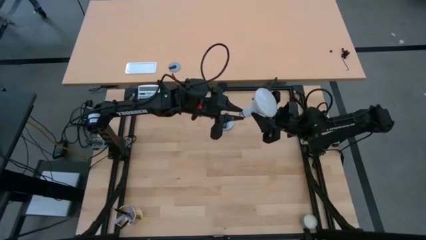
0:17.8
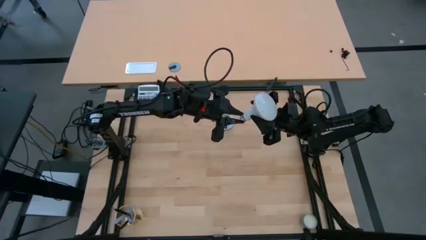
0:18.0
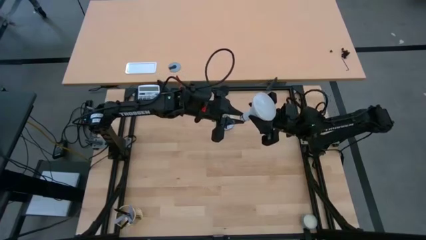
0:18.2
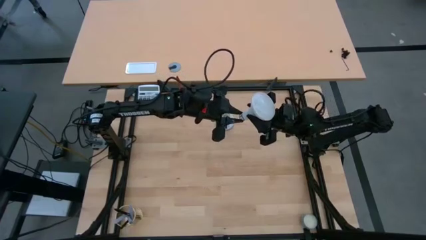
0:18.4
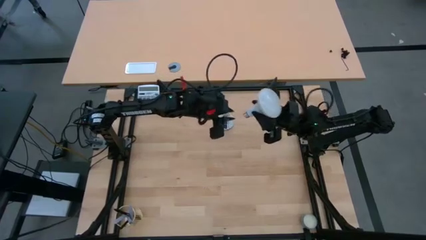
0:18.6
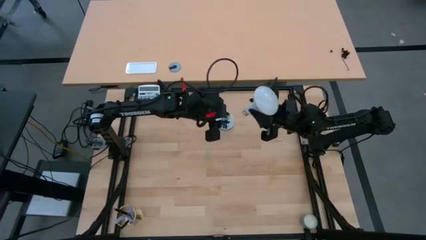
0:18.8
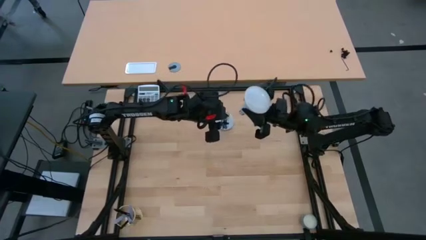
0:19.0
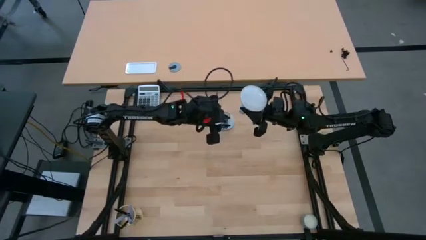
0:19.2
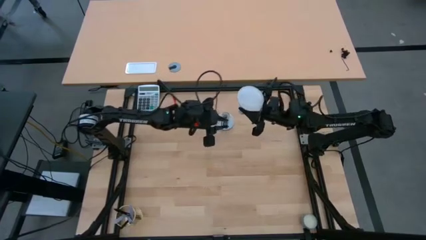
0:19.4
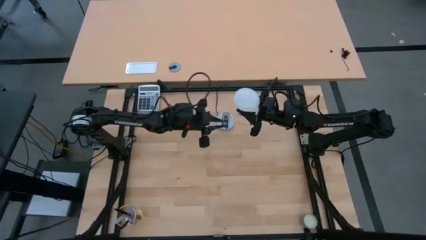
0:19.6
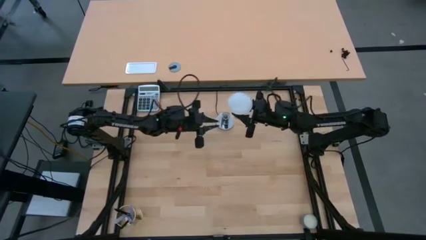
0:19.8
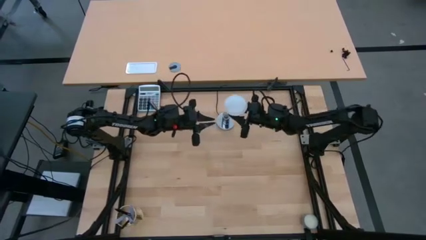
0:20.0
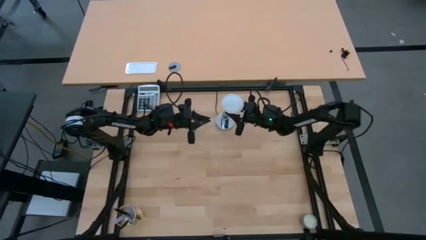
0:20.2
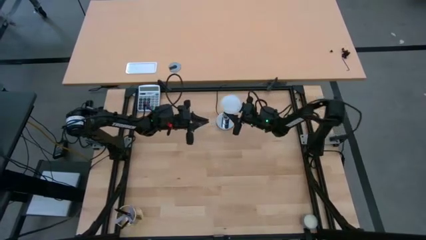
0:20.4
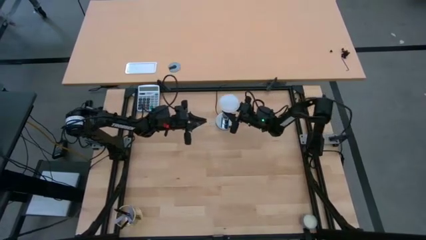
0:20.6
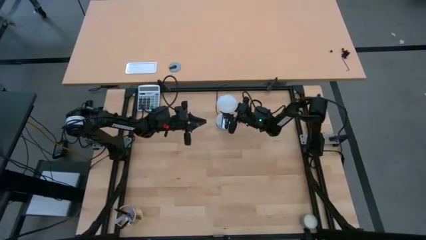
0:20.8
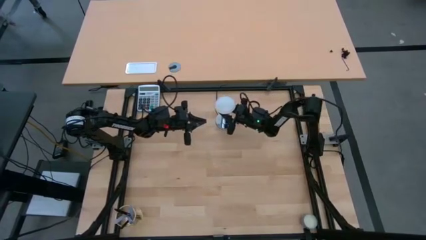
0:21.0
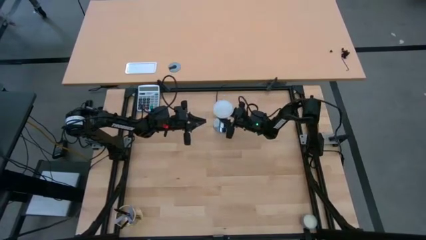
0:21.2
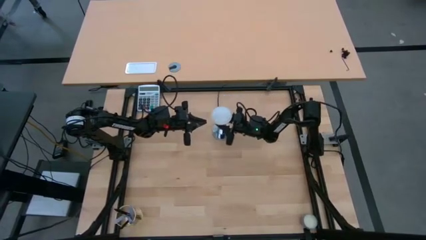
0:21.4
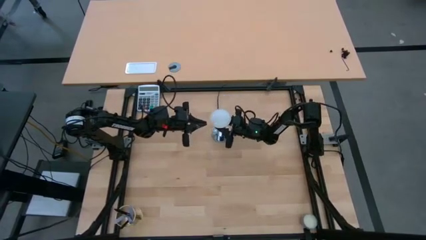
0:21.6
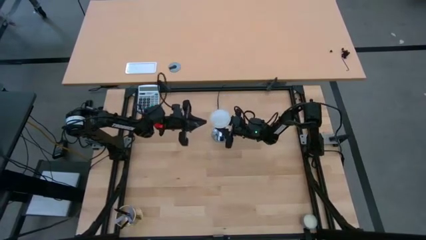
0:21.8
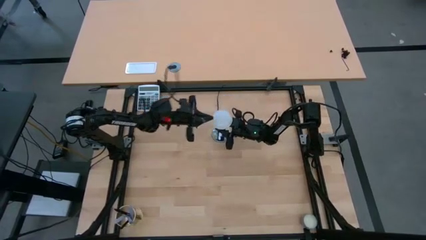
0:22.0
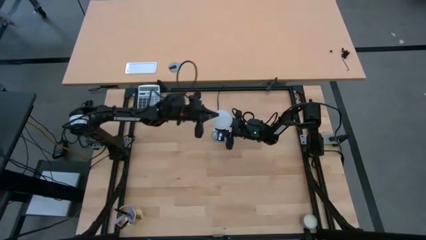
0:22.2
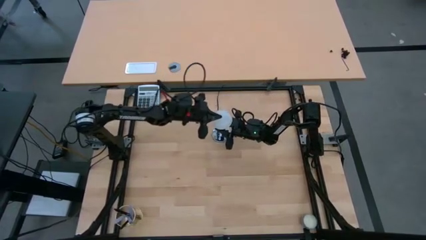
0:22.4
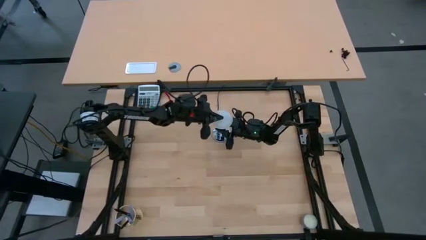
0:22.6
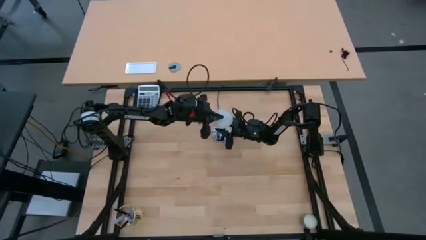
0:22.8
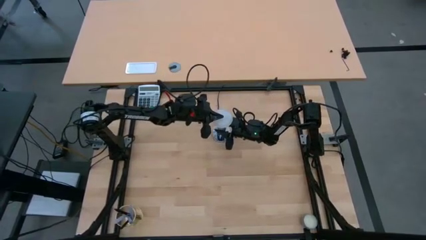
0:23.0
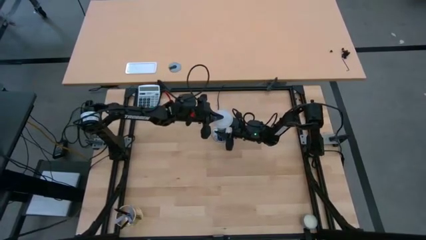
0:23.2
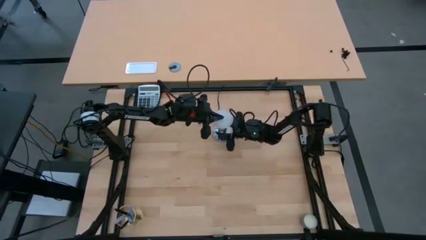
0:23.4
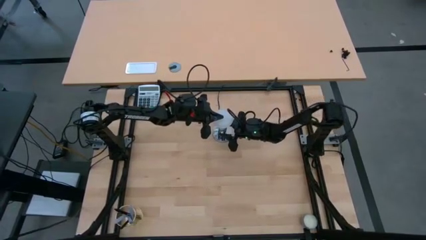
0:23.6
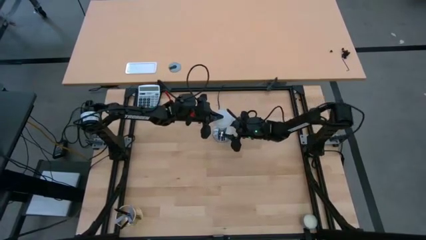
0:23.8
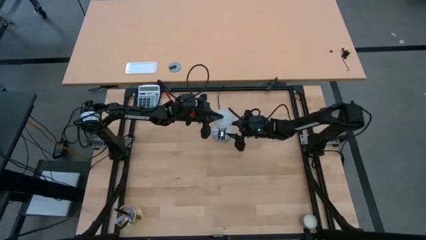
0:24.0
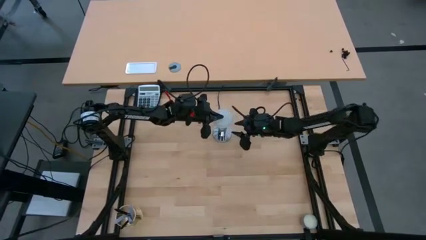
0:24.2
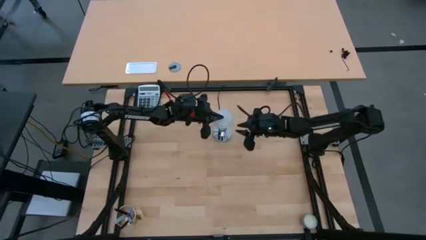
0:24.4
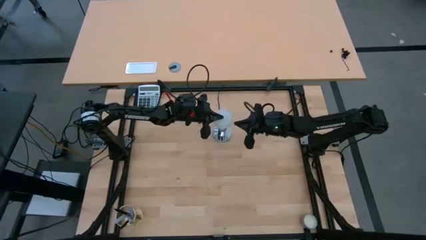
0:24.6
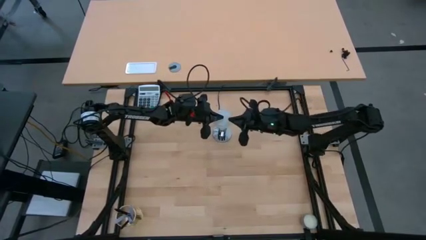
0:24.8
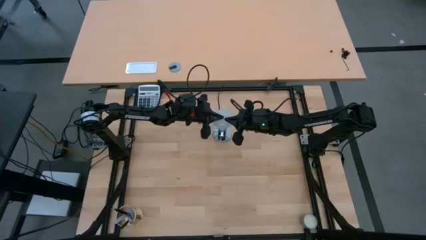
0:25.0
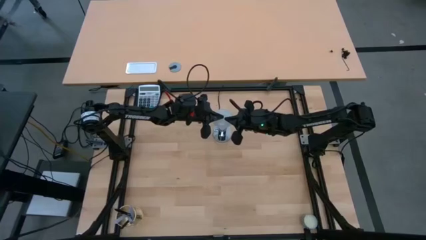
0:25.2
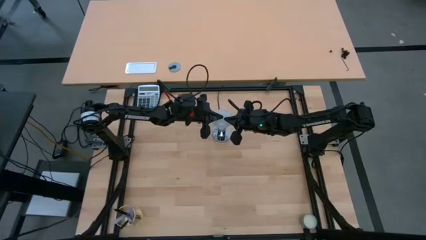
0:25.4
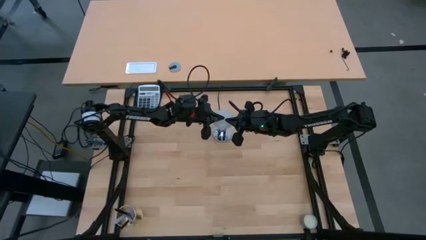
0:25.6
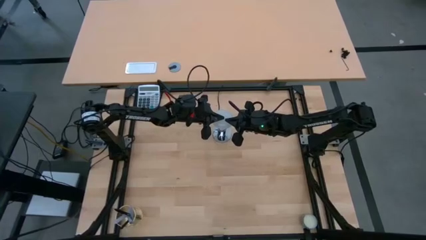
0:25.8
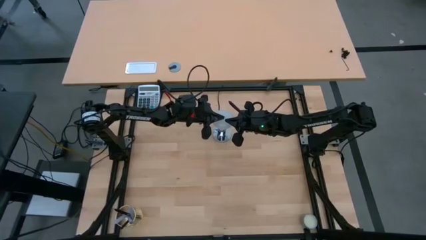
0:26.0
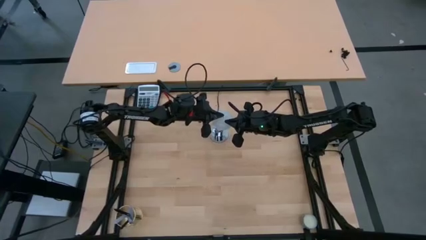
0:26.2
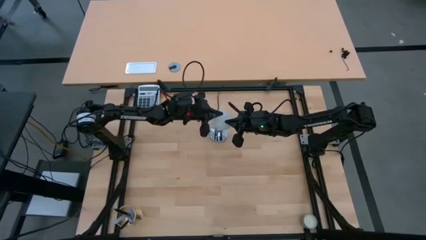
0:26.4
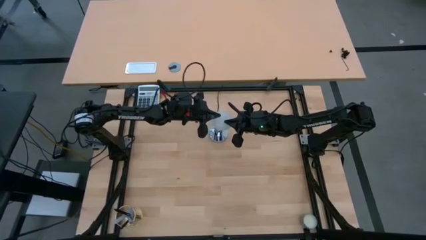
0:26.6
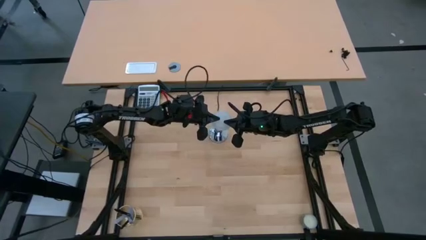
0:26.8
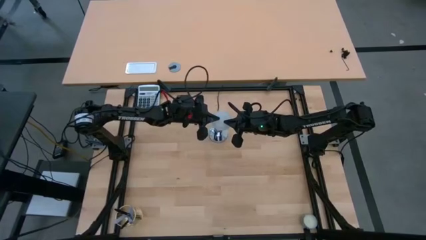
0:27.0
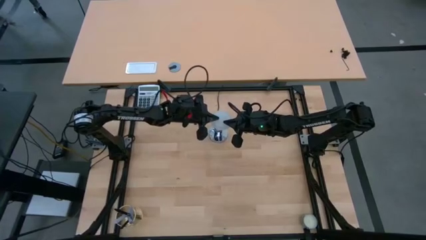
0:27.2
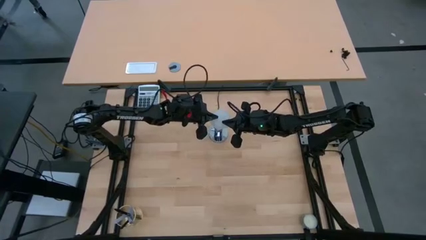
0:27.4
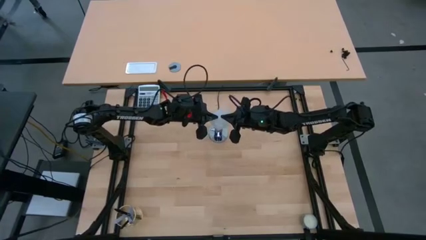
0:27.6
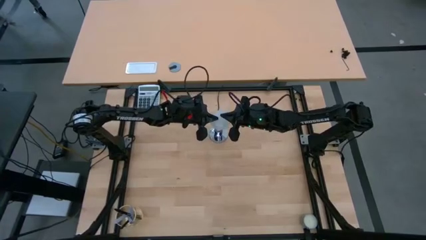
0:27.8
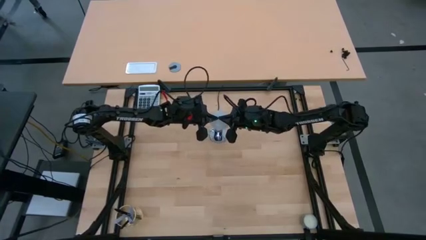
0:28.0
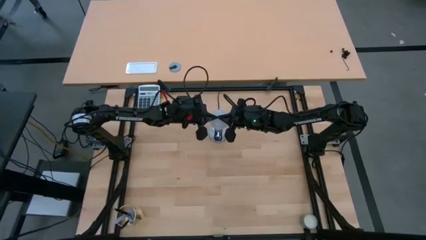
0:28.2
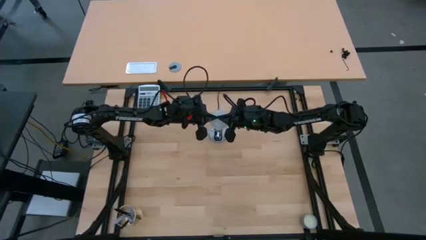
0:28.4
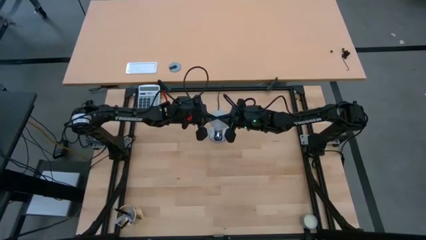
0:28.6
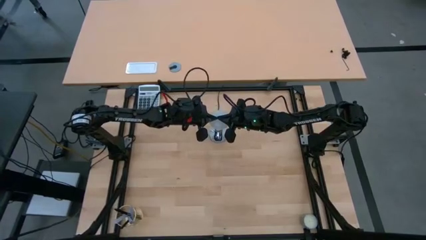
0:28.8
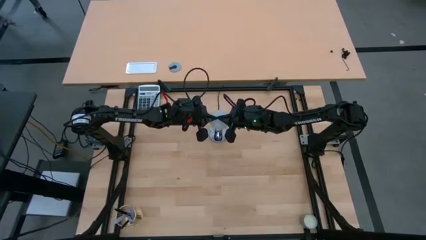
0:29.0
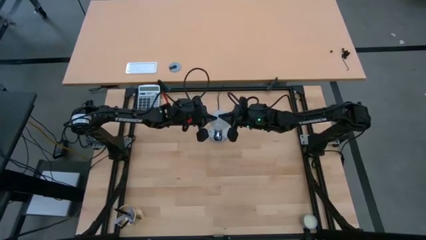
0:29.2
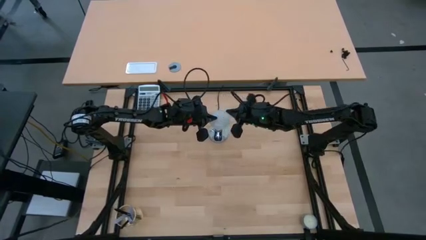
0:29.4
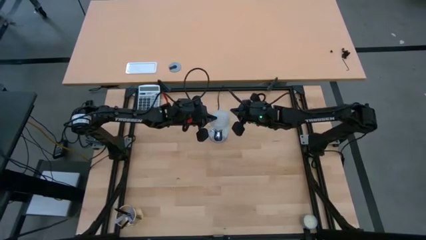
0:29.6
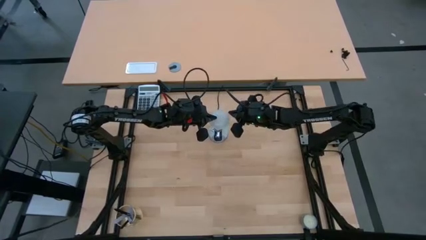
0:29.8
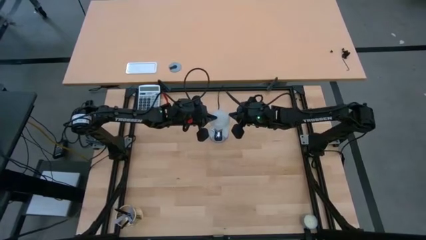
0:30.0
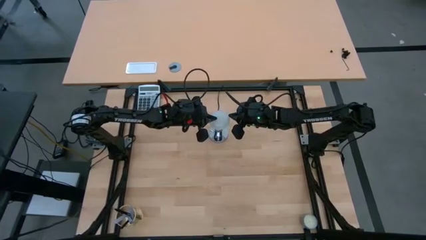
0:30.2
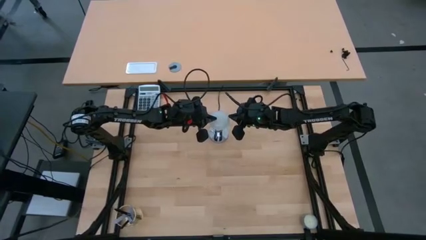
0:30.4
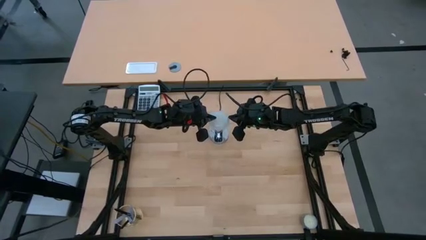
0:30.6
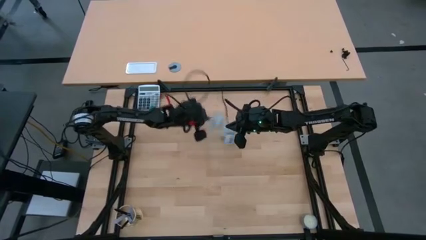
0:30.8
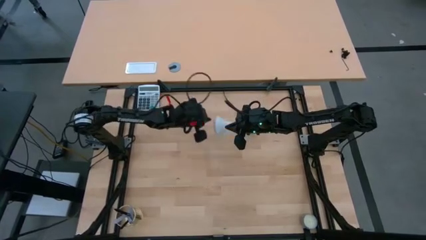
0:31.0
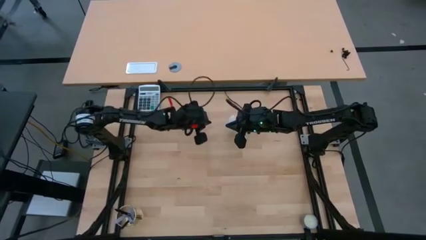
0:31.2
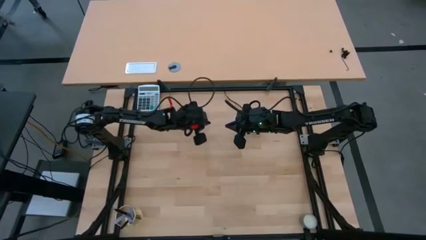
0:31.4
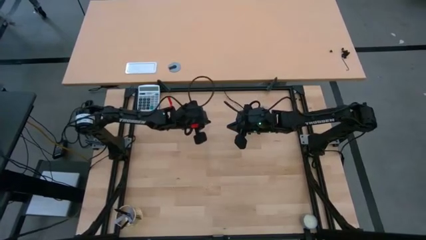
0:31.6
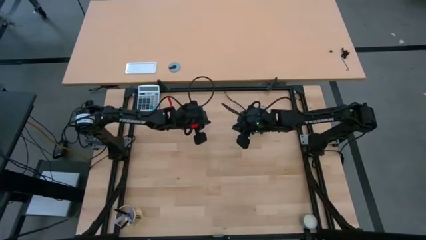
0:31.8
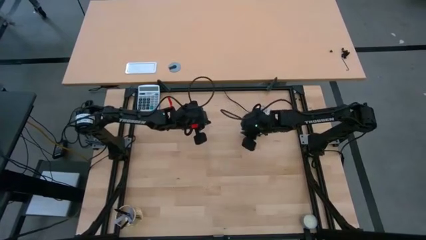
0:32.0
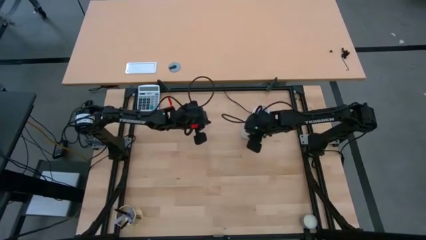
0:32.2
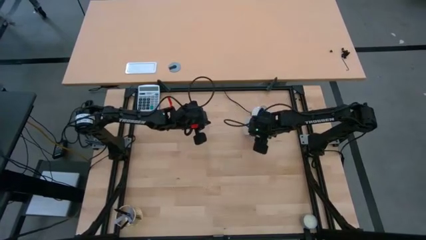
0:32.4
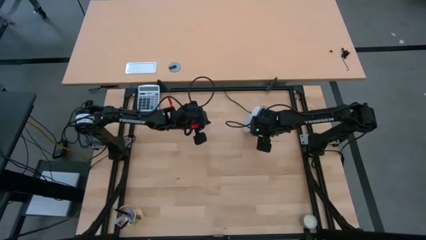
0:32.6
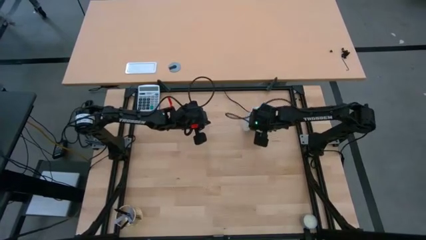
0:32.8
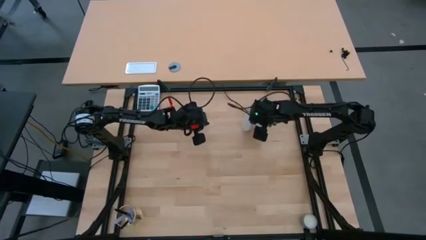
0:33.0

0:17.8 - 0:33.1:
Task: Screw lightbulb
Insert the lightbulb into the lamp
